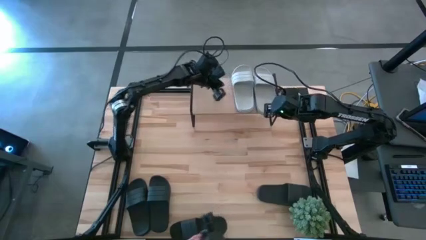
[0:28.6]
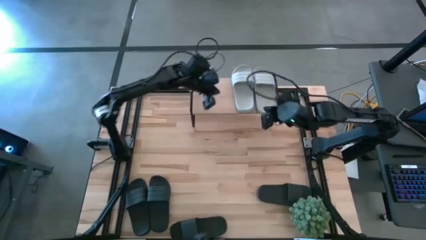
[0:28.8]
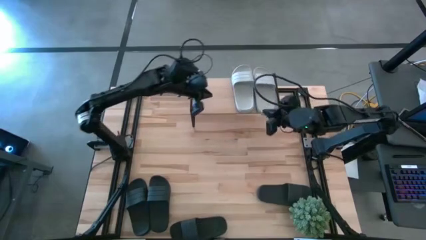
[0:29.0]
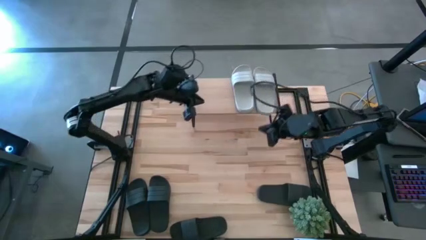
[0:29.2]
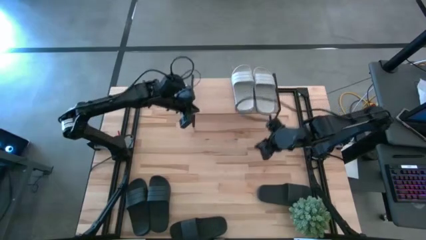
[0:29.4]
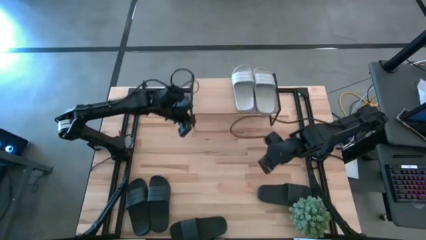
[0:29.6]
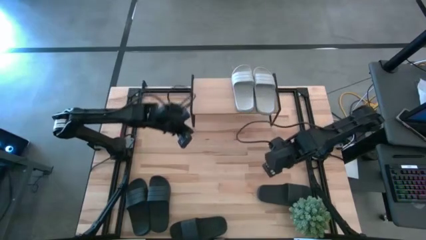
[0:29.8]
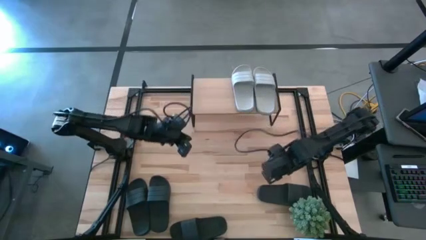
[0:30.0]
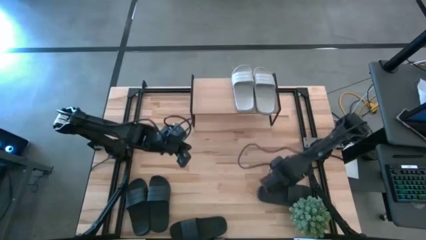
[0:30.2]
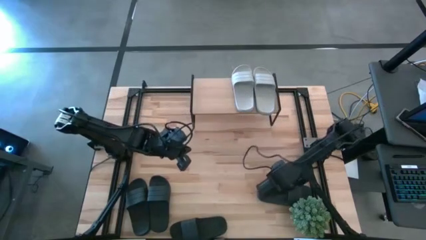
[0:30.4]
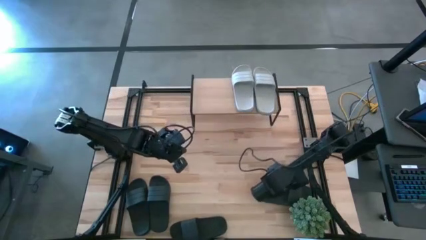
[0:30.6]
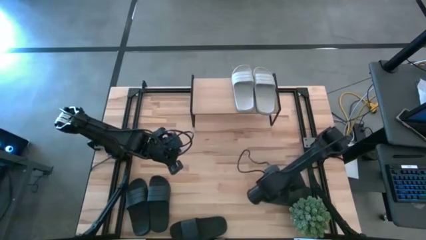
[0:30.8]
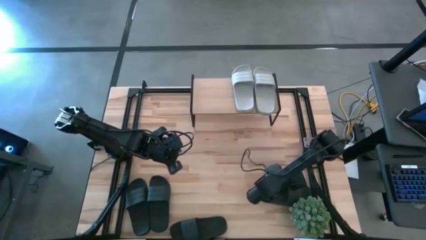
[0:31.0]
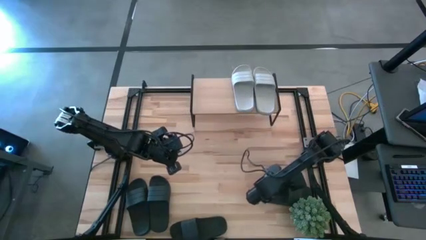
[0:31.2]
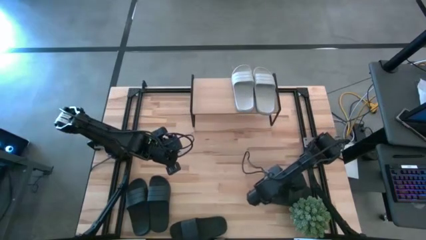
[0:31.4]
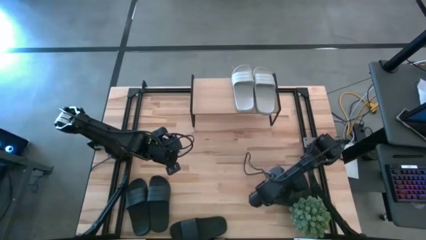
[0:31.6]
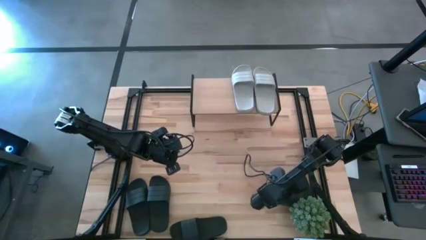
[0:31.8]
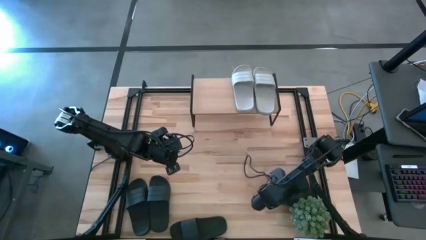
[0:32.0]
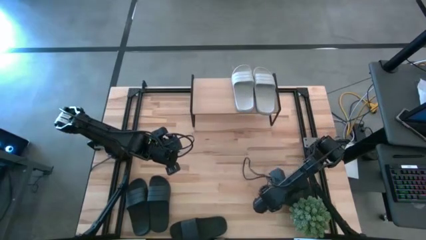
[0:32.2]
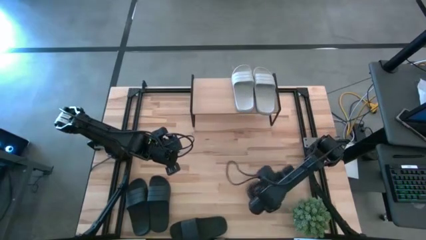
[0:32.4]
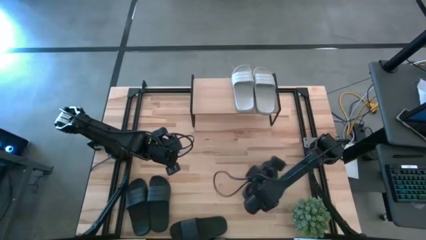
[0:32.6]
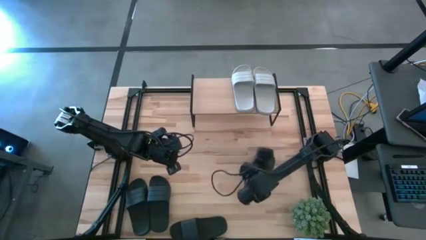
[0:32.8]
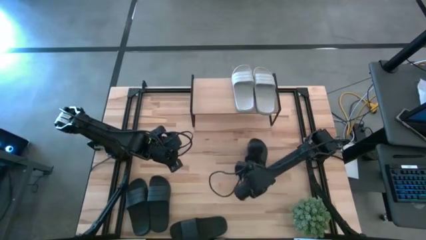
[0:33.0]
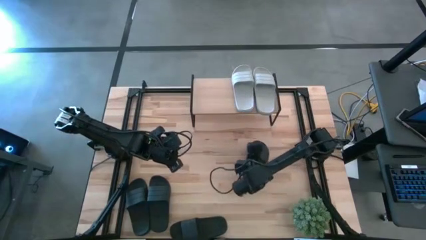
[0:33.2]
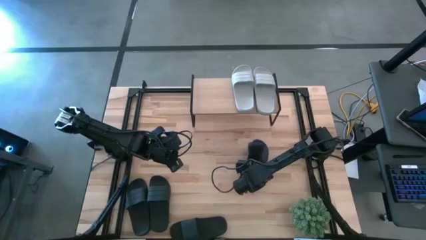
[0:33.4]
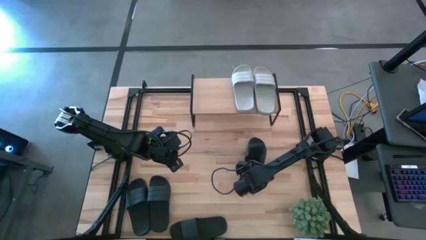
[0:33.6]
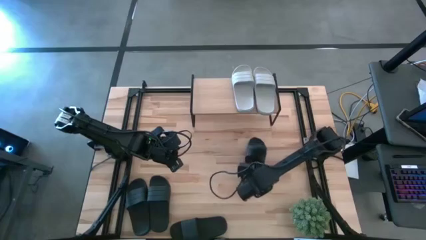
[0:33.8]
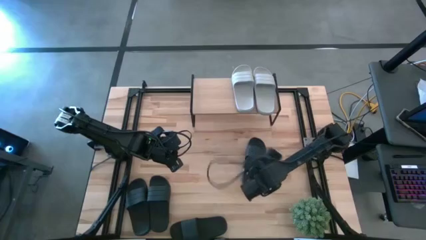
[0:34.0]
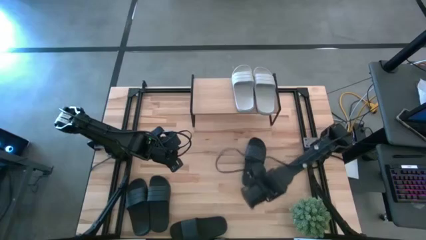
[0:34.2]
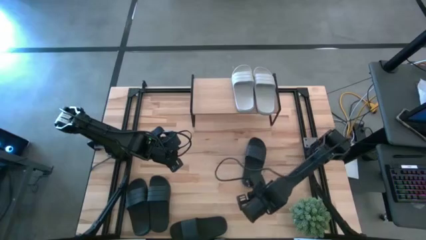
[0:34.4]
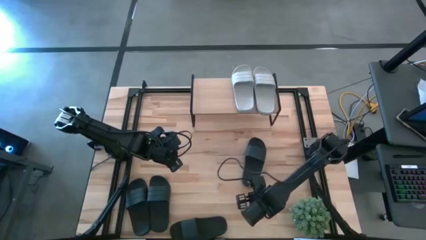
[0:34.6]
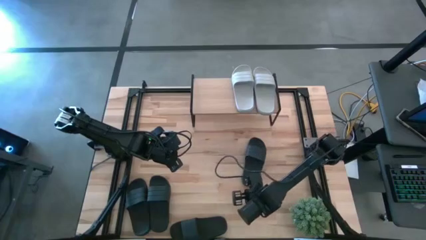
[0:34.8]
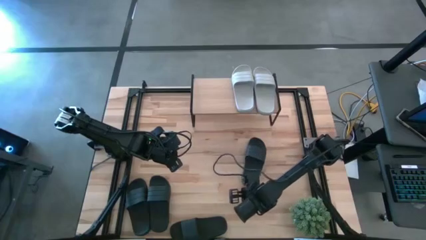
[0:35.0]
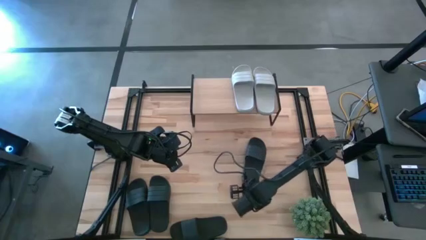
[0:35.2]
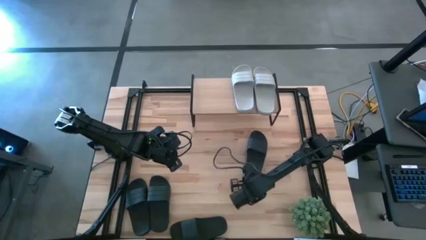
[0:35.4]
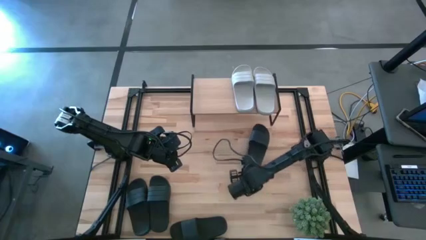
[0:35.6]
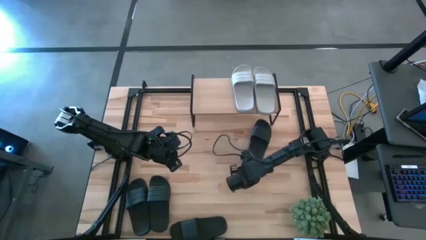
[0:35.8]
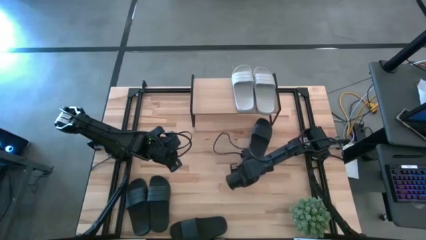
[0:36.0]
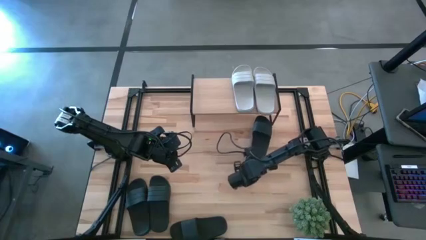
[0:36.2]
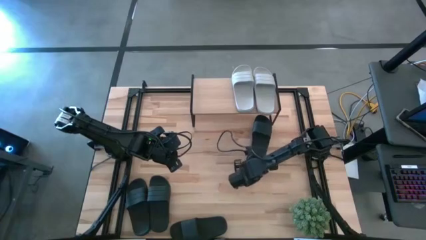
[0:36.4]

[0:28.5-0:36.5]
Task: Pick and place slides into the shelf
Put the black slide under the shelf

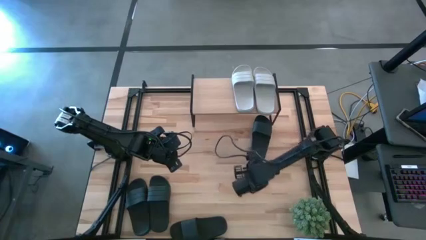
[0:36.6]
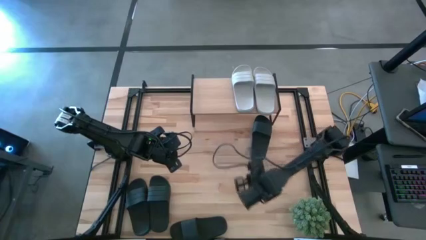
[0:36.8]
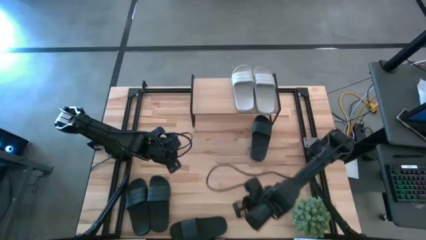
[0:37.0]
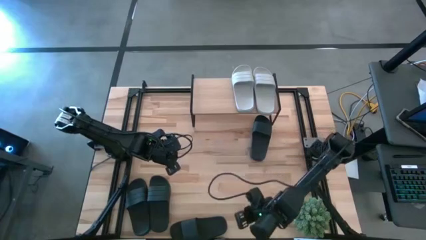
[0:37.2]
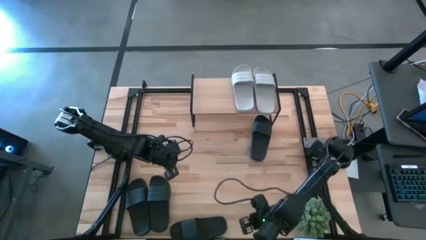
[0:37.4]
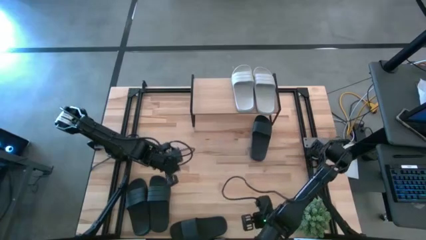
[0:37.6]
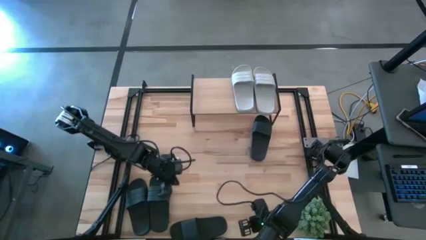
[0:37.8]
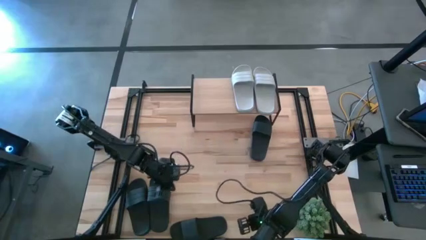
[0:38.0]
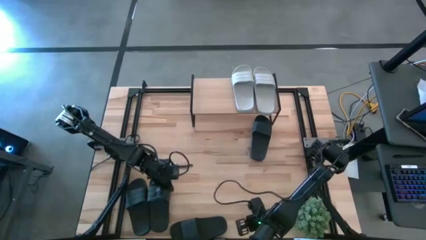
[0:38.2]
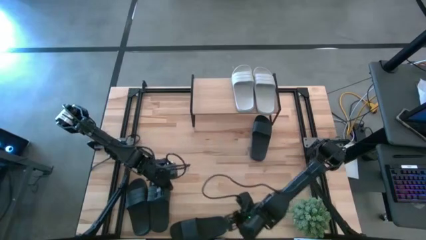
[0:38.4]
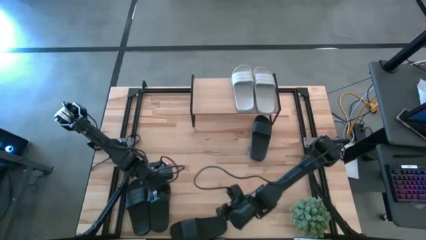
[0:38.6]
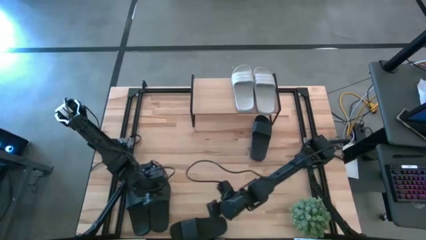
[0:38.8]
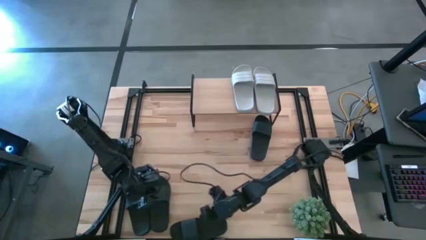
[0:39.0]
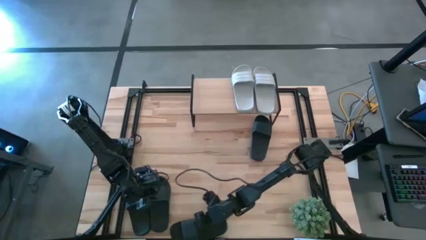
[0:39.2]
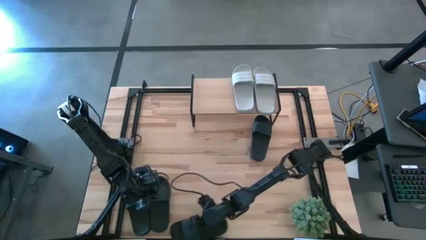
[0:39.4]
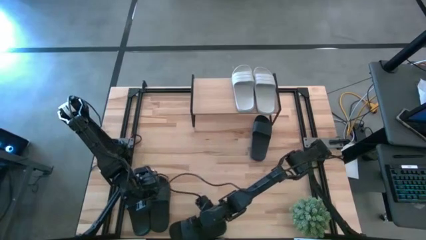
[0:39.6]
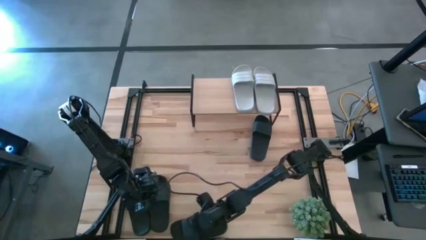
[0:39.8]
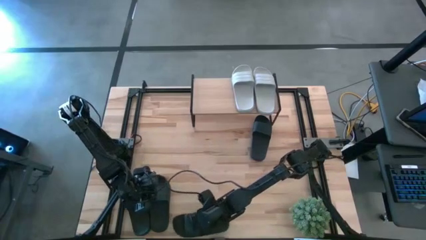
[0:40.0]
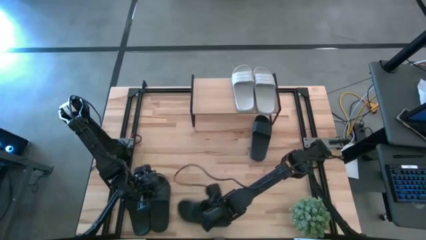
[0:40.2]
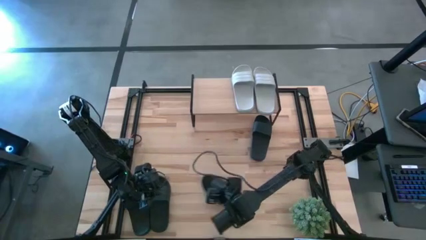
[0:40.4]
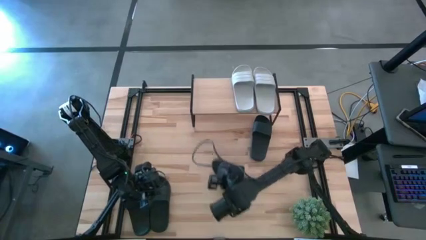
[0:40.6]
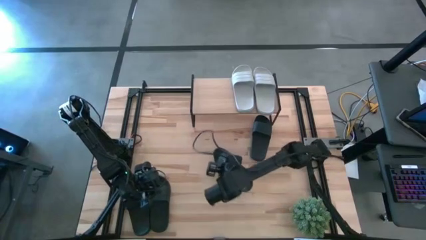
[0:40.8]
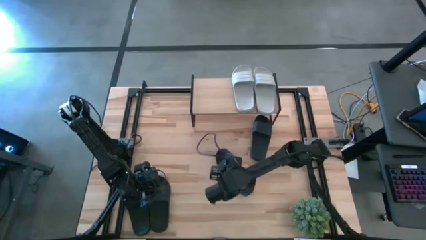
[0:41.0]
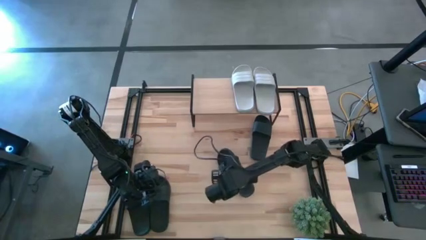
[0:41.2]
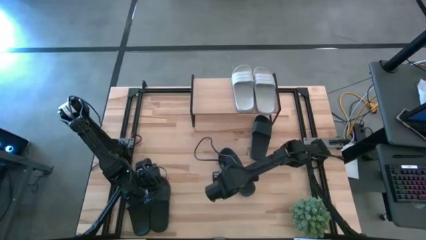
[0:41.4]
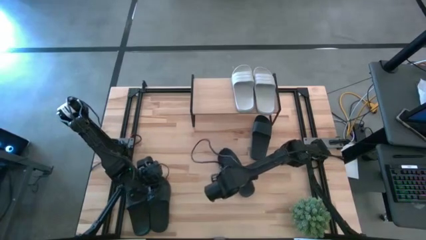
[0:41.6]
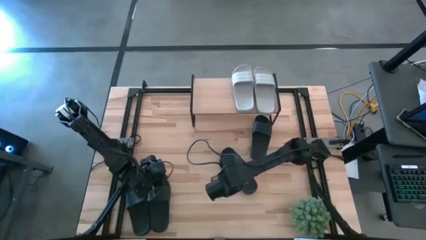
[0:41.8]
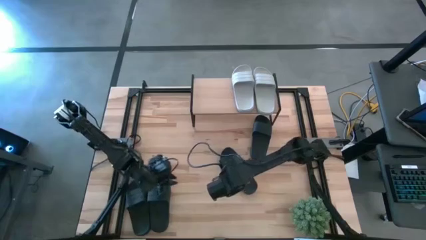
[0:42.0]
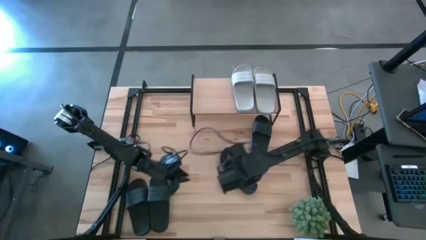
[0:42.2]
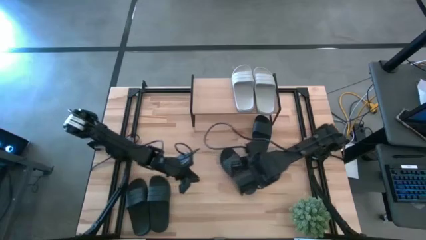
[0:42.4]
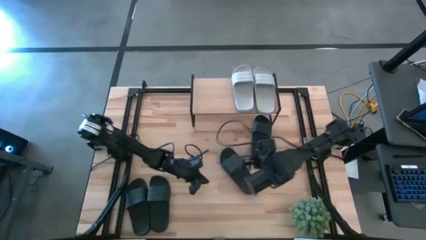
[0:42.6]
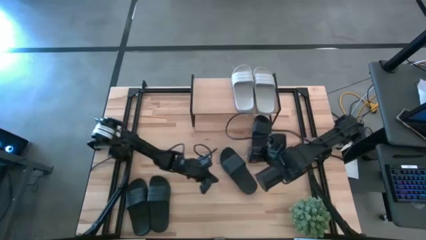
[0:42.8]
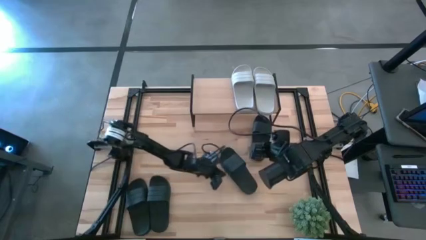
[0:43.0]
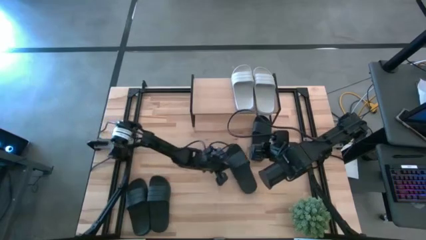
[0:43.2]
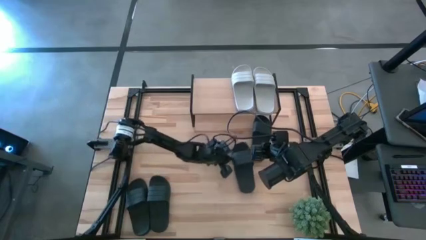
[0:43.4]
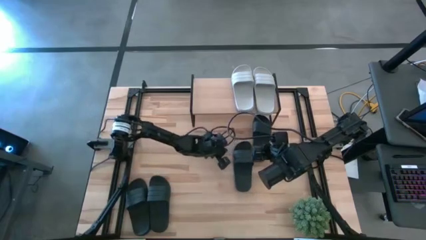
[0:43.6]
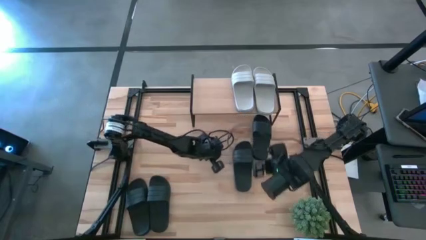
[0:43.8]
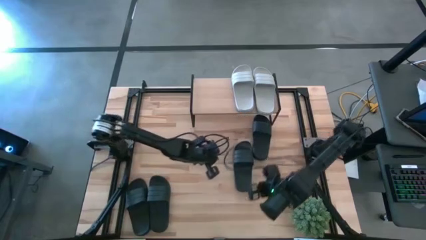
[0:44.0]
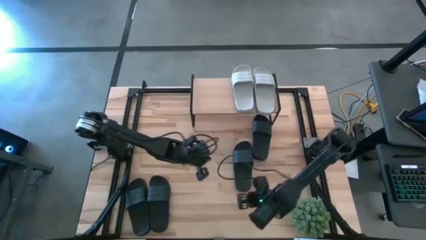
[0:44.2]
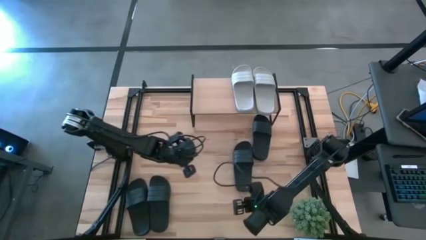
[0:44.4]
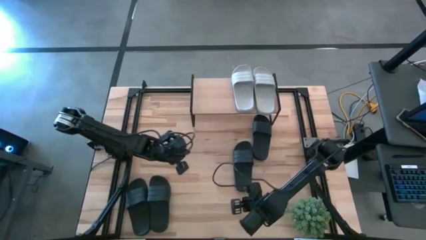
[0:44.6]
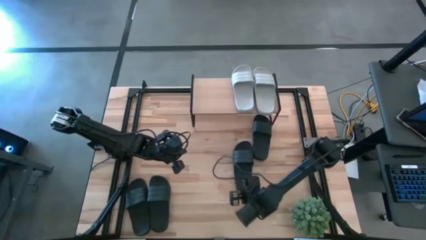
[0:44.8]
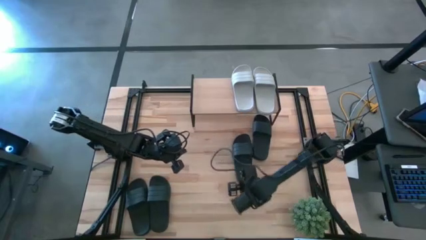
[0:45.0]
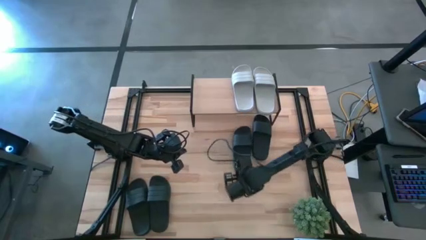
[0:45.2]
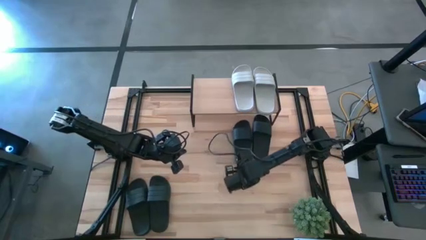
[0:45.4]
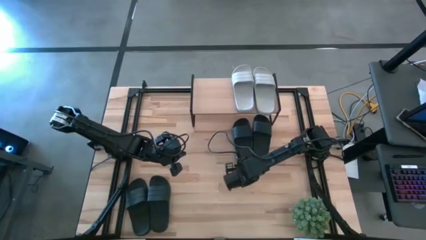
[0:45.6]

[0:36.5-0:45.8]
Put the black slide under the shelf
